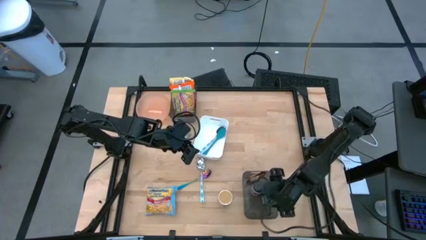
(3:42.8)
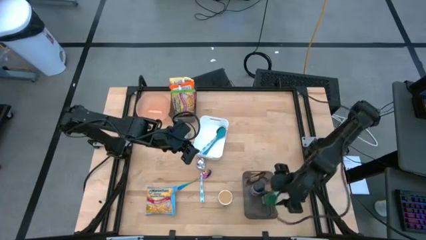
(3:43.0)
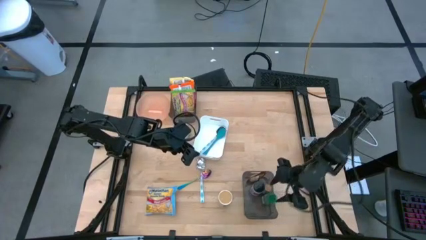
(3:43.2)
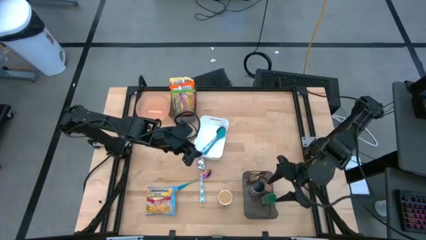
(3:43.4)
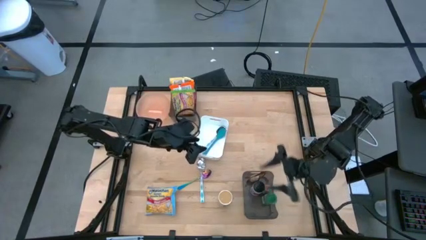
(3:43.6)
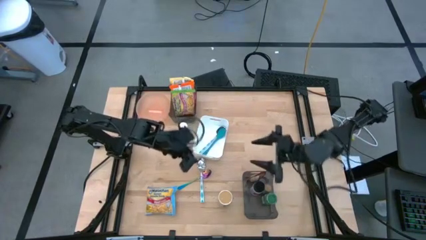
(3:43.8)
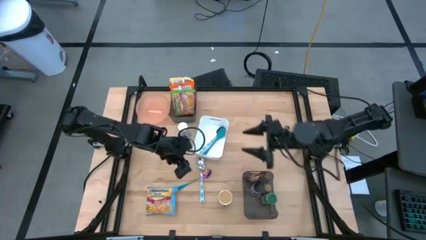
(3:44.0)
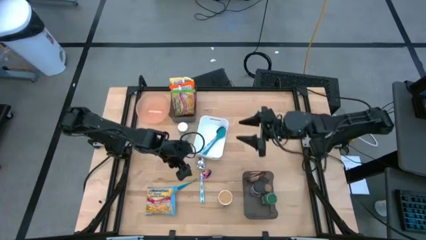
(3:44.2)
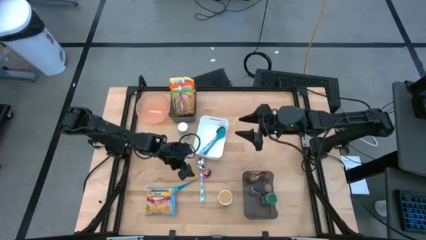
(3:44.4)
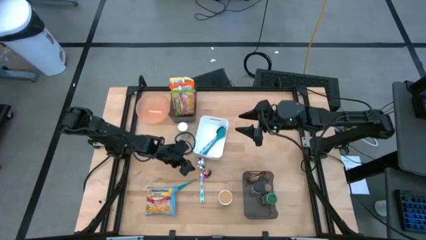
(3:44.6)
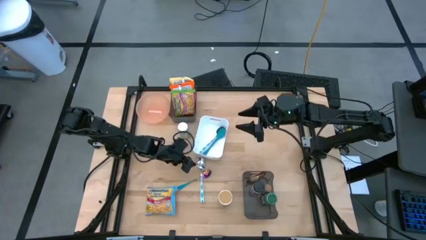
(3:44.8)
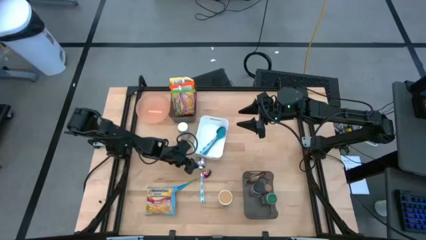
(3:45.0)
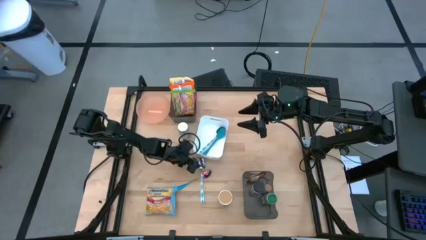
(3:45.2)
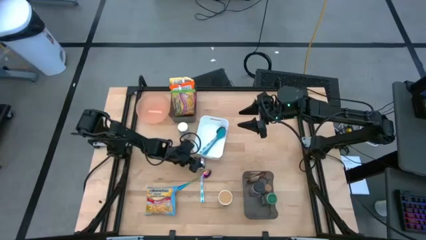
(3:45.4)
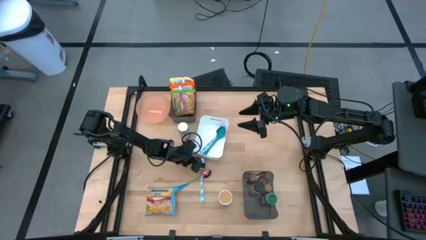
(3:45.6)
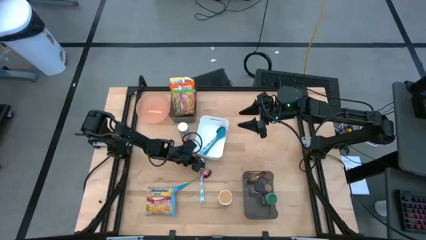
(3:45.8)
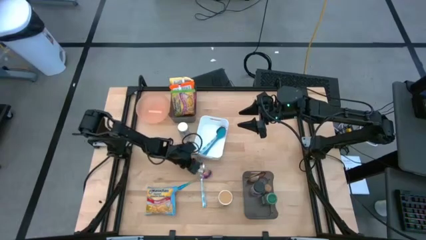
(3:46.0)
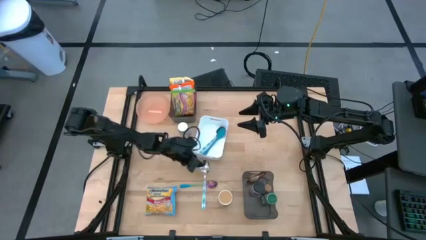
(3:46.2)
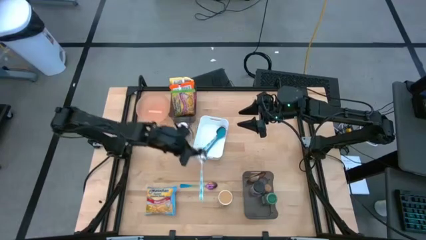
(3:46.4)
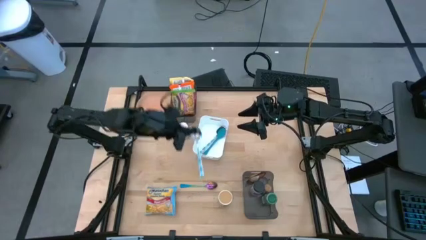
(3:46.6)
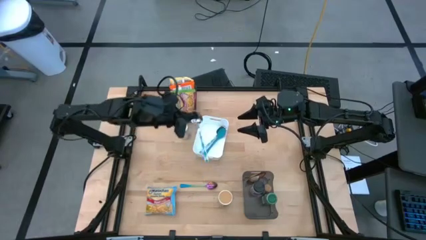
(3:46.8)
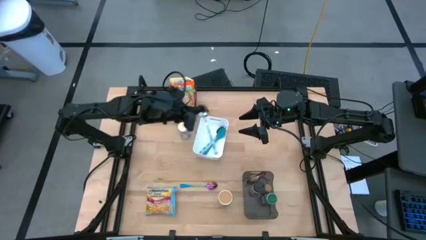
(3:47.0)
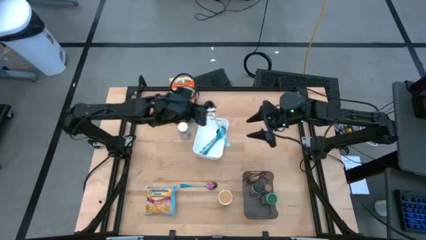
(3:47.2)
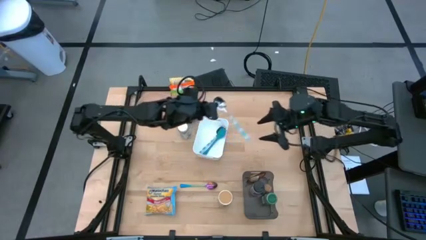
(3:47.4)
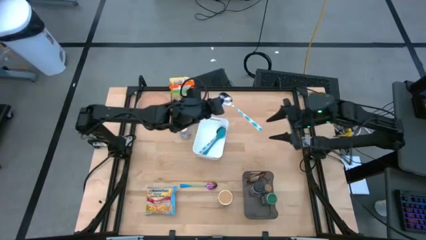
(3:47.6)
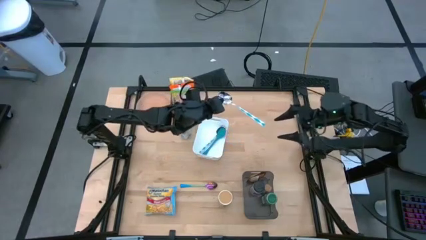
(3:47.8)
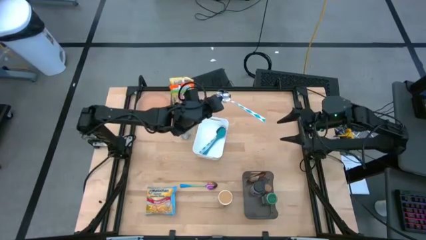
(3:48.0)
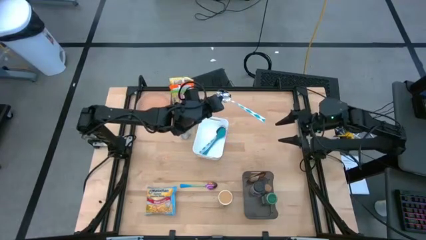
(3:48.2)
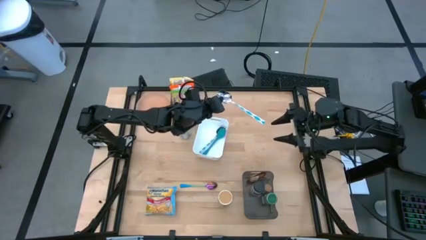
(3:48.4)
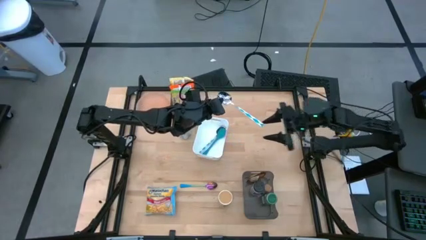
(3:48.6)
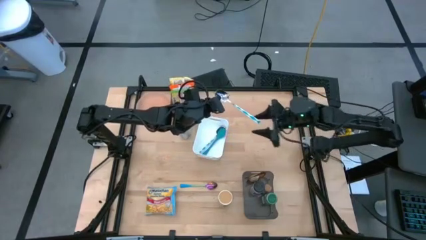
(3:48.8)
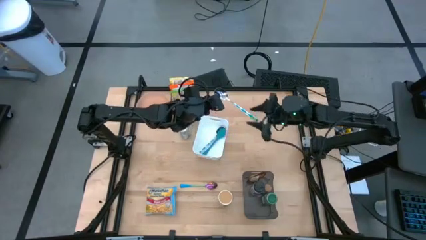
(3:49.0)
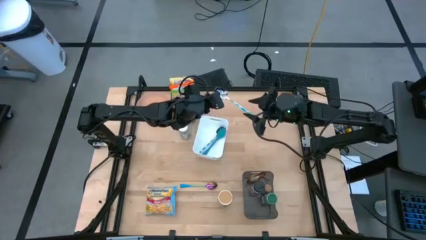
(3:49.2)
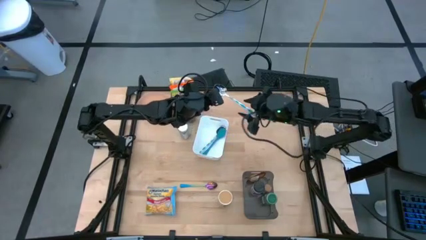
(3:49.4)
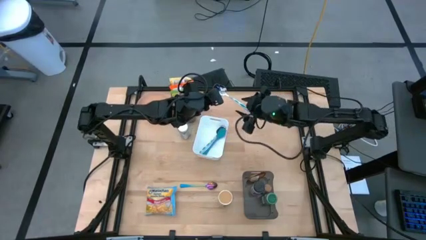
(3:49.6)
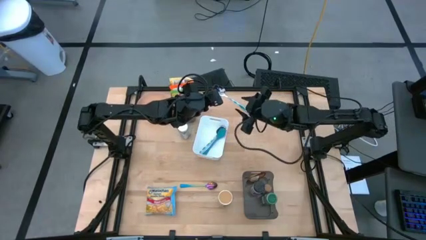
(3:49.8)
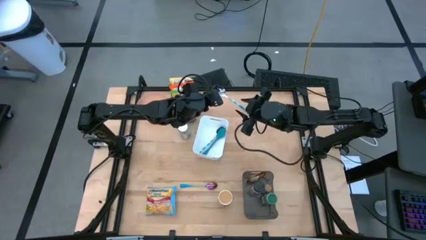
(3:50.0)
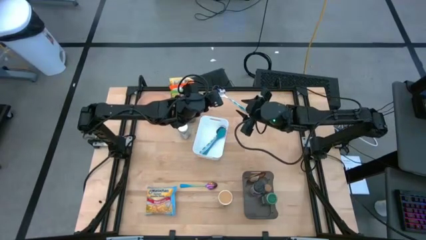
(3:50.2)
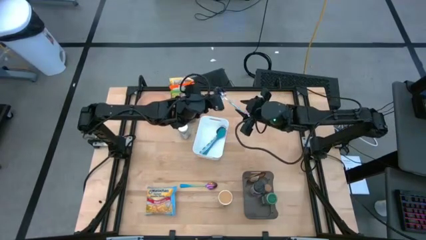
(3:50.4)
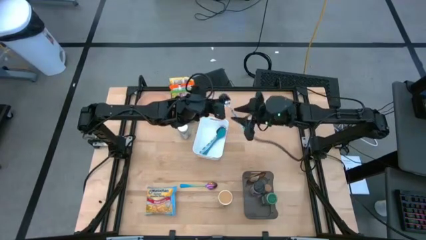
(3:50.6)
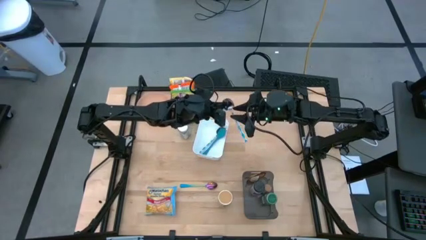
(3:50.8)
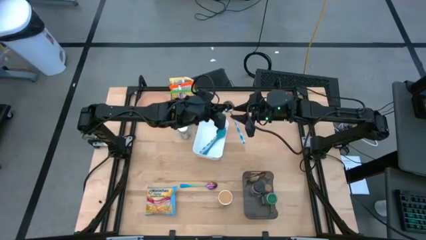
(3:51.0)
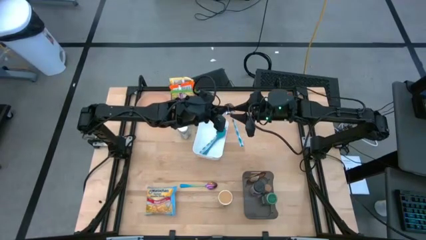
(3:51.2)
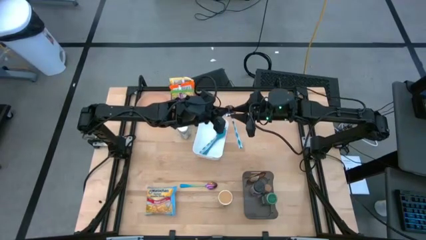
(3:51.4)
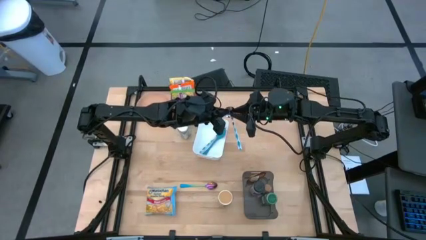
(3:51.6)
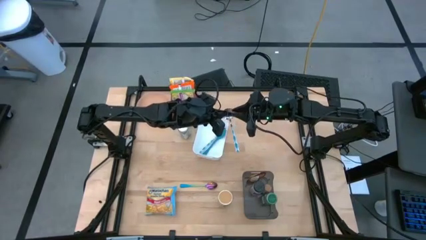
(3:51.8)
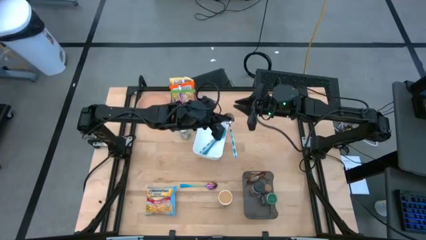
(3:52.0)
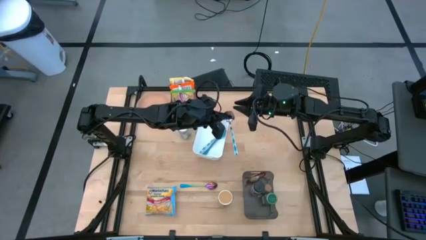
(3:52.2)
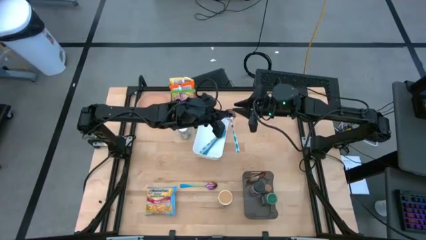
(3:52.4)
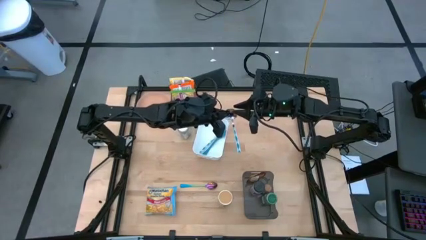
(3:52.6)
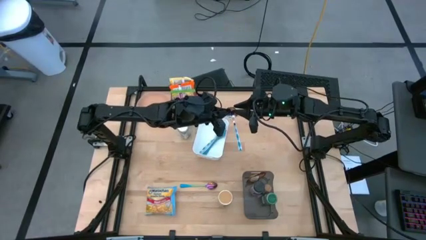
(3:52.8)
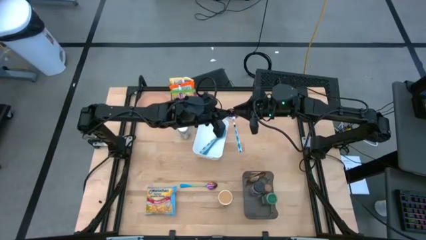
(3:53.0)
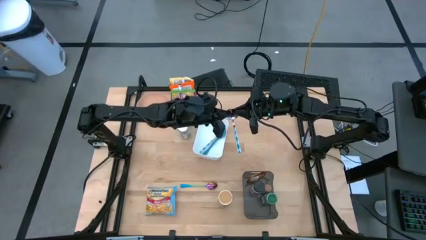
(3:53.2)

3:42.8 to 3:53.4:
Task: Pick & Place Food Item
Put the white patterned spoon into the white bin

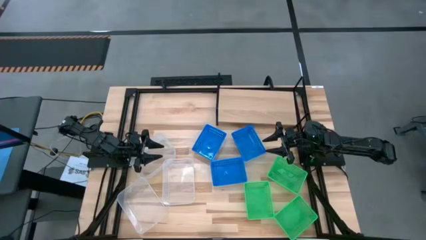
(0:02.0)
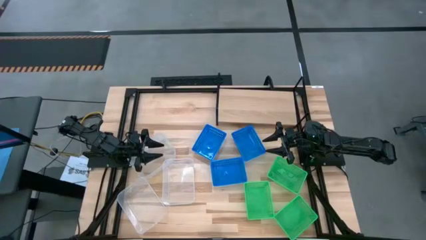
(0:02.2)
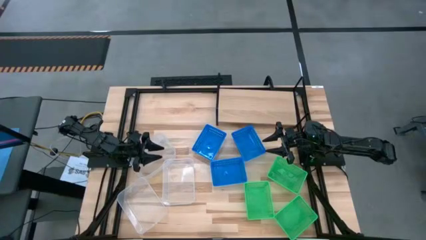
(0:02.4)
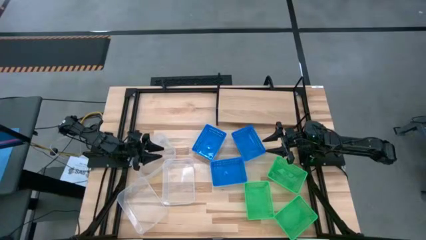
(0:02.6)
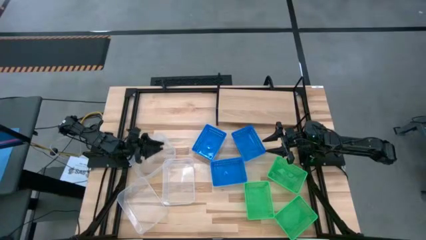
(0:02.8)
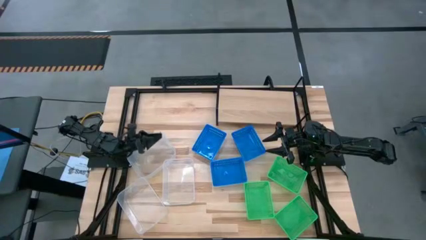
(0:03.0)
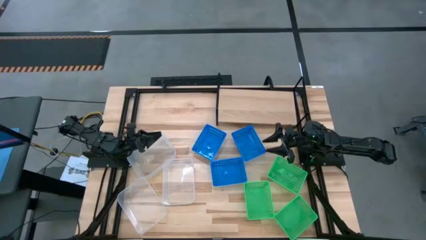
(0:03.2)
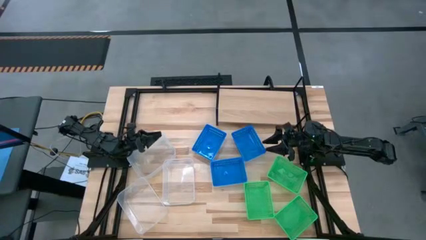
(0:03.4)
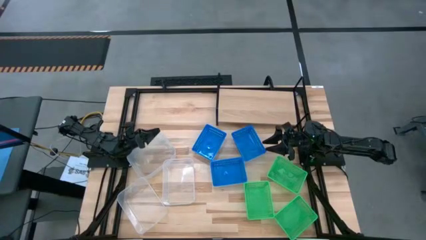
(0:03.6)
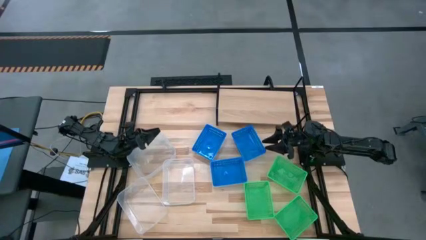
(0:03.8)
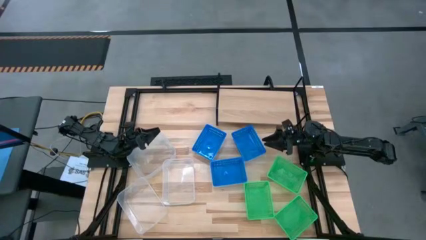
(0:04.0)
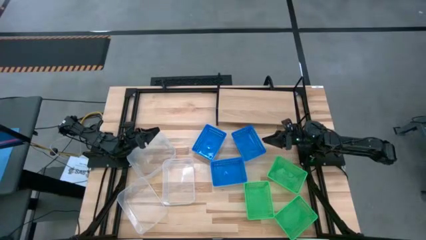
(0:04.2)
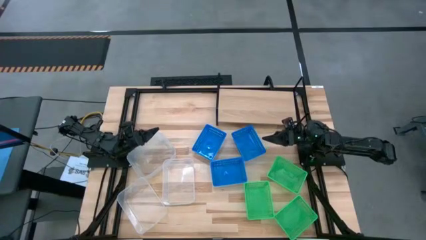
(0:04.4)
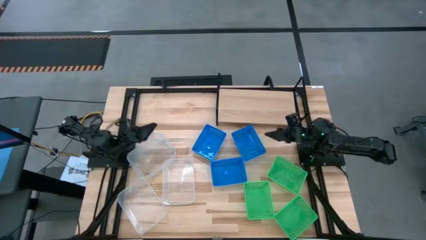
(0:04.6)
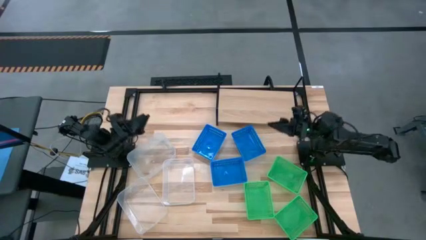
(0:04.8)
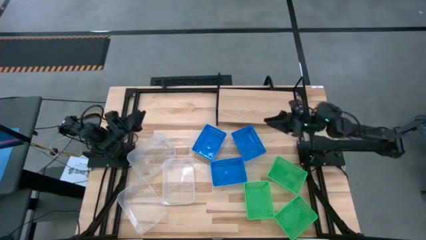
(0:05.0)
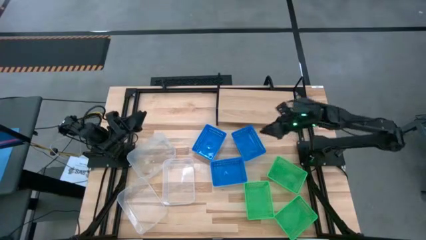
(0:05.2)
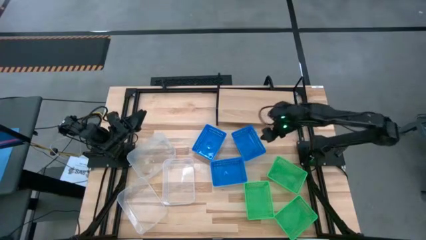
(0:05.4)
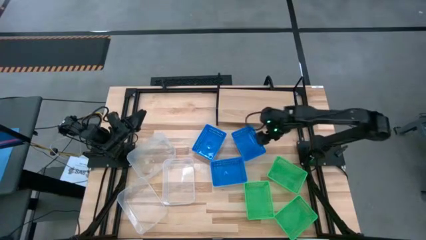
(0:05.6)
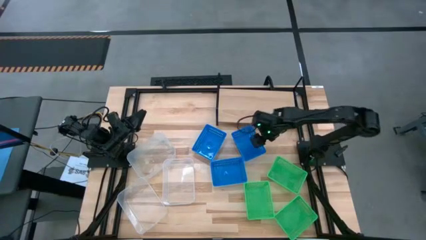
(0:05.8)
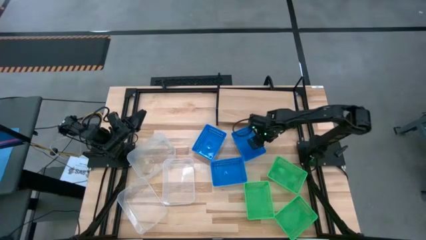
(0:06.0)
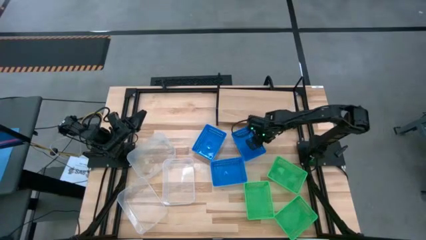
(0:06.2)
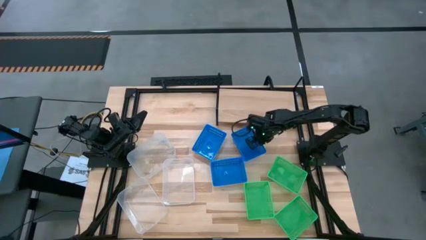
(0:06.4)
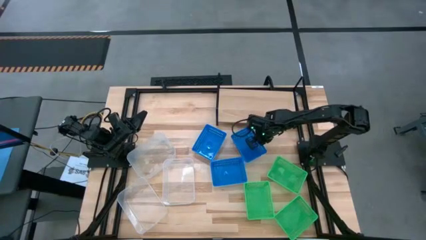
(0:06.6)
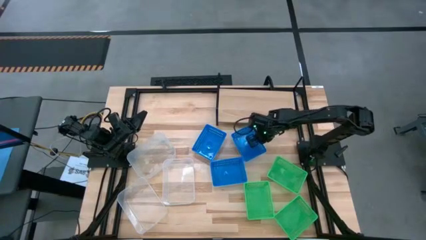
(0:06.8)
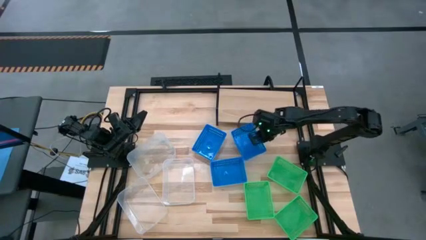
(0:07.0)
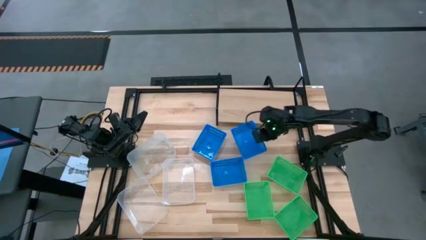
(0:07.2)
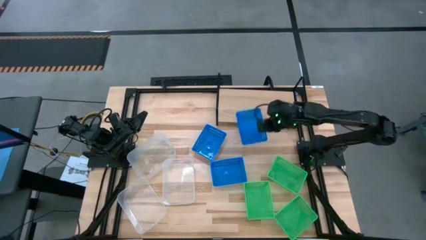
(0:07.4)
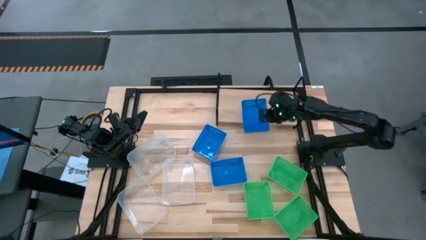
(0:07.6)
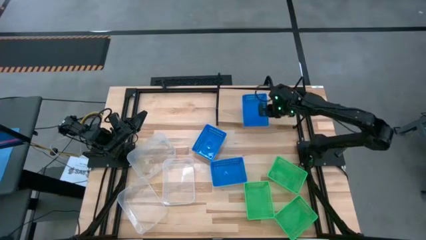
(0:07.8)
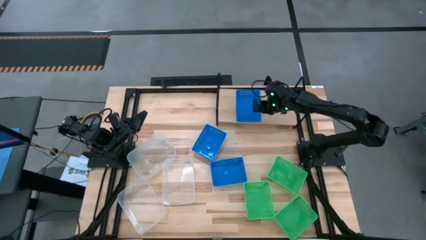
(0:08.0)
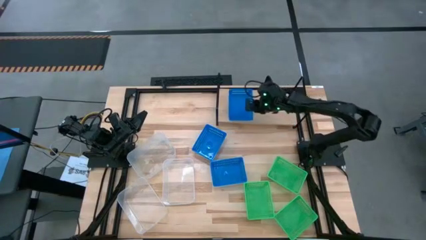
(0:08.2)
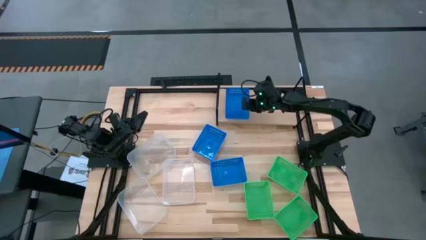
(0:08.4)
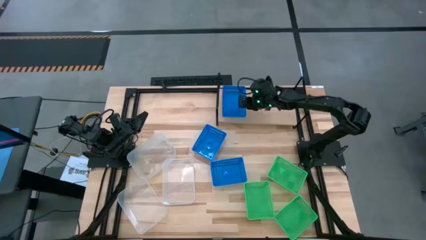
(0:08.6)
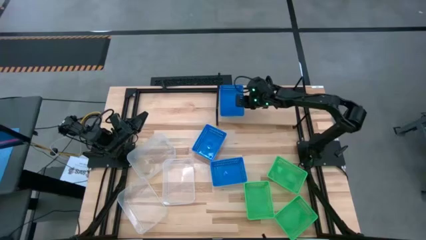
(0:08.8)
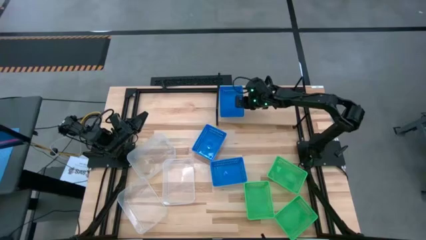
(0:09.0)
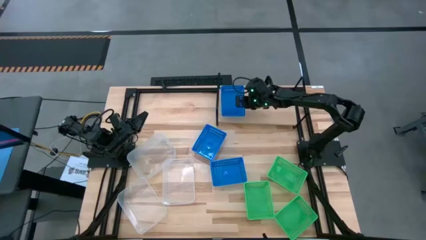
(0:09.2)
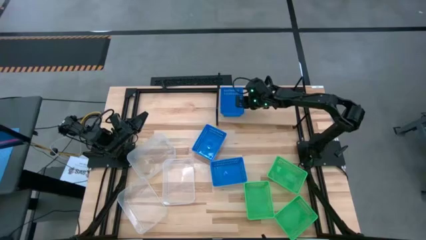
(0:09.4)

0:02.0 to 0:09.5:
Task: Stack baskets on shelf by color
Put the top right blue bin on the shelf
